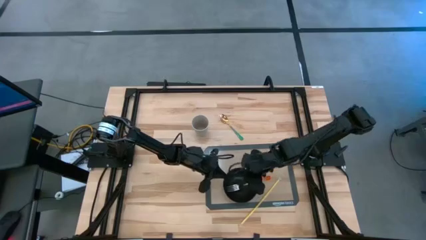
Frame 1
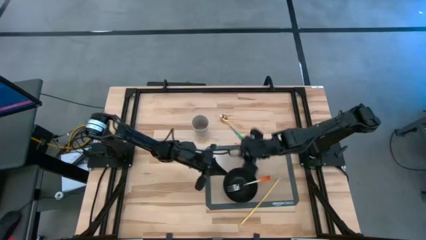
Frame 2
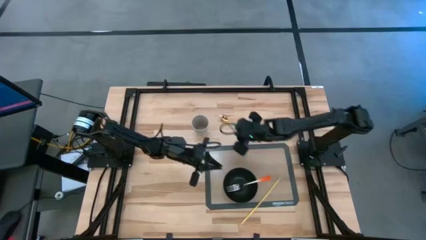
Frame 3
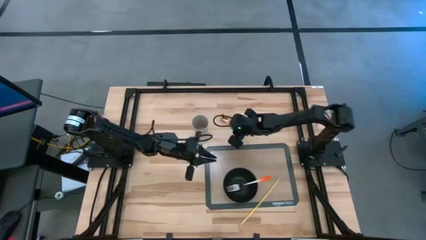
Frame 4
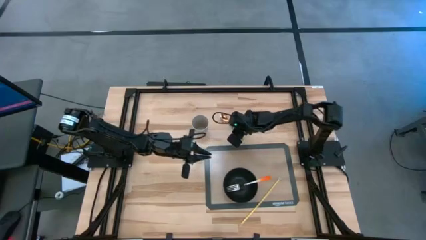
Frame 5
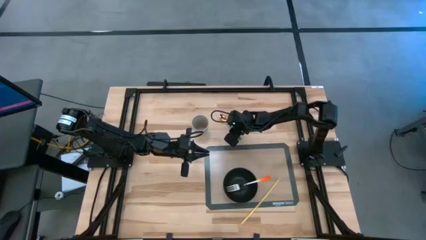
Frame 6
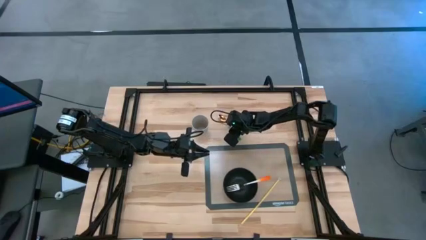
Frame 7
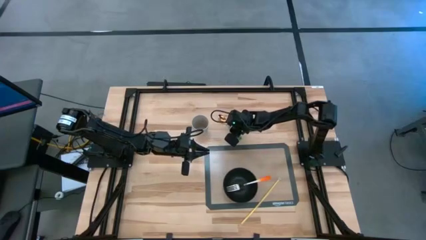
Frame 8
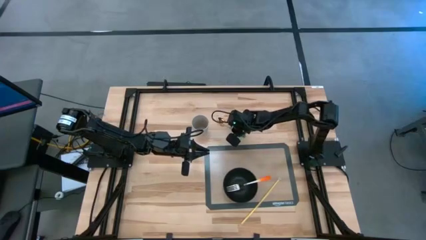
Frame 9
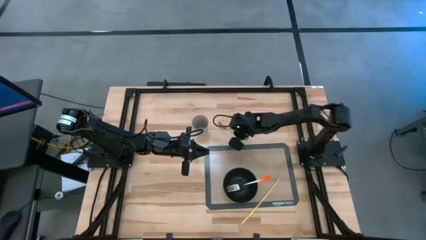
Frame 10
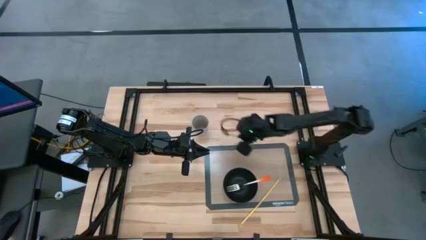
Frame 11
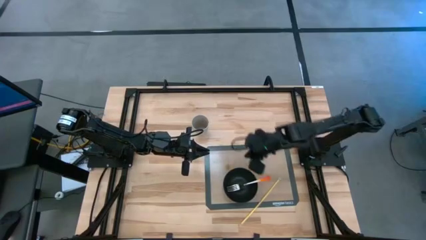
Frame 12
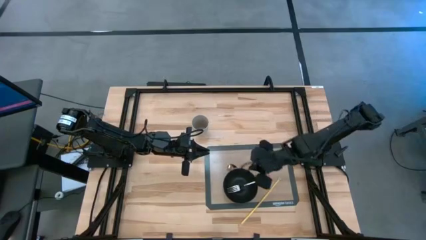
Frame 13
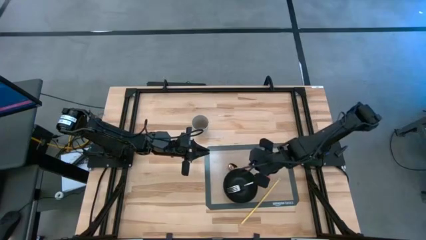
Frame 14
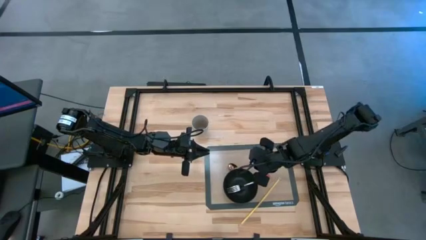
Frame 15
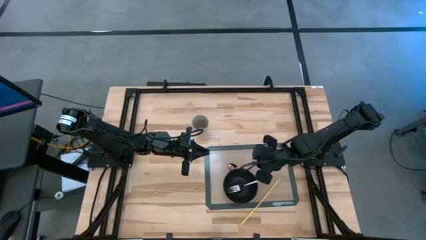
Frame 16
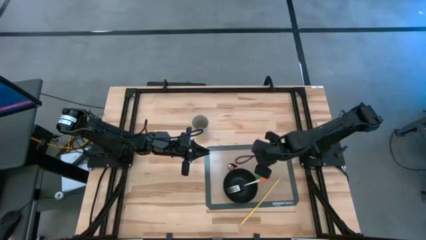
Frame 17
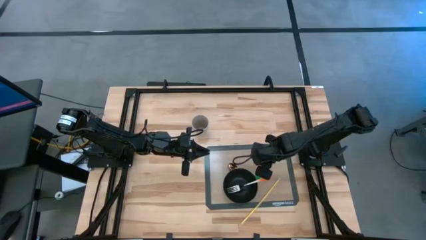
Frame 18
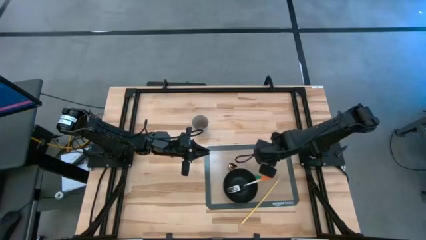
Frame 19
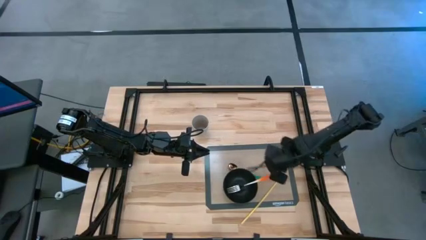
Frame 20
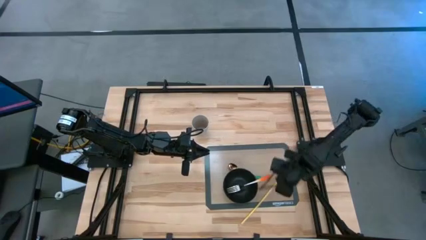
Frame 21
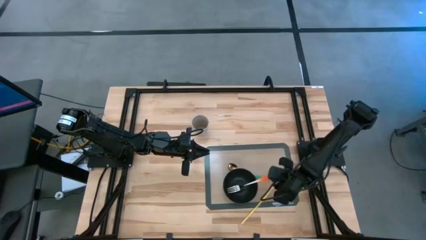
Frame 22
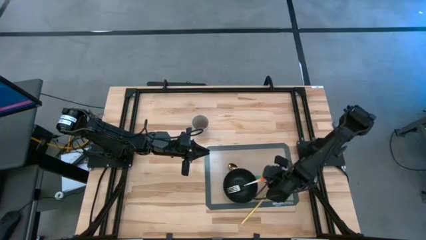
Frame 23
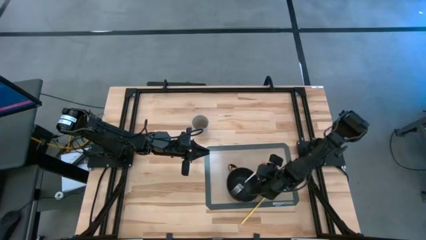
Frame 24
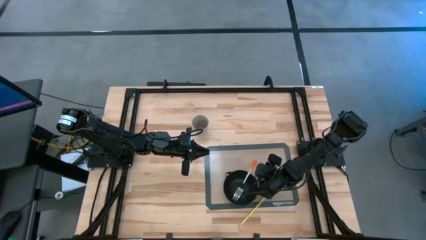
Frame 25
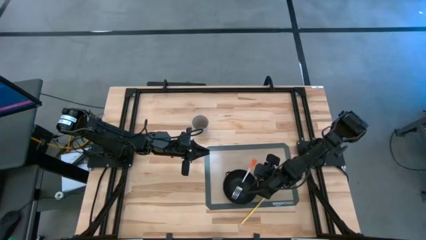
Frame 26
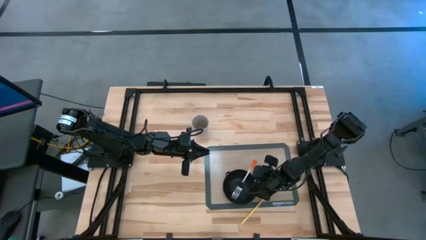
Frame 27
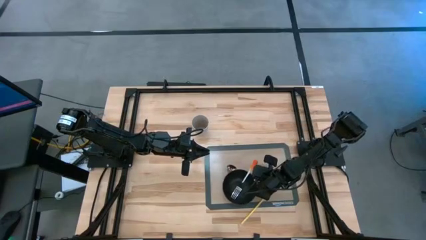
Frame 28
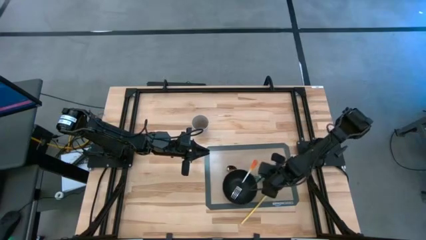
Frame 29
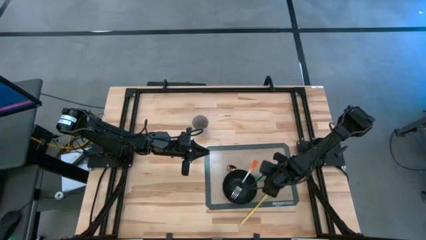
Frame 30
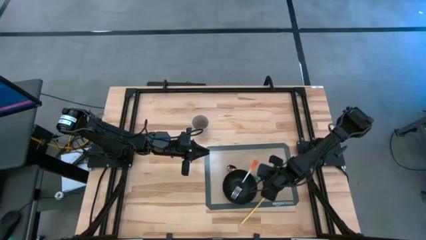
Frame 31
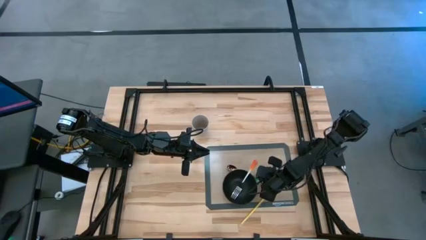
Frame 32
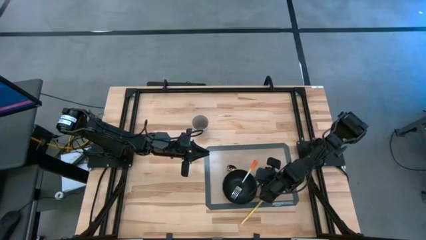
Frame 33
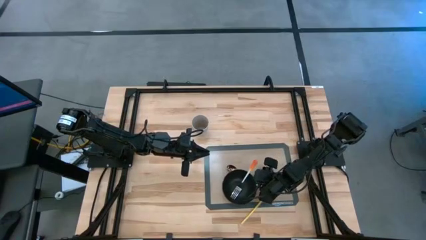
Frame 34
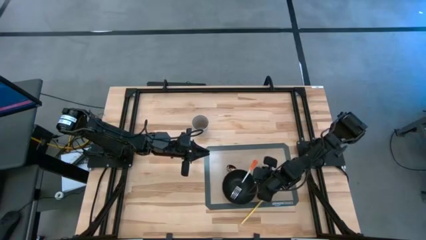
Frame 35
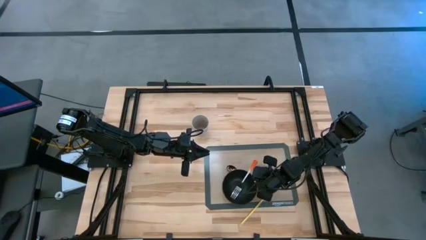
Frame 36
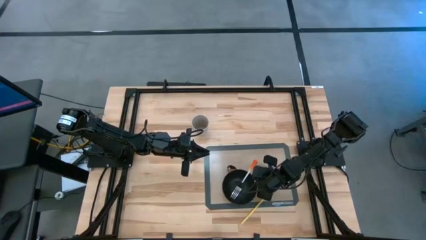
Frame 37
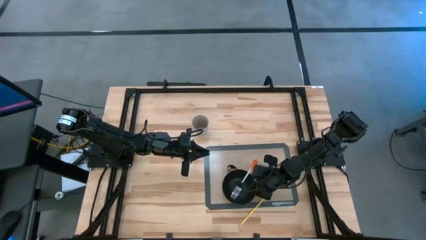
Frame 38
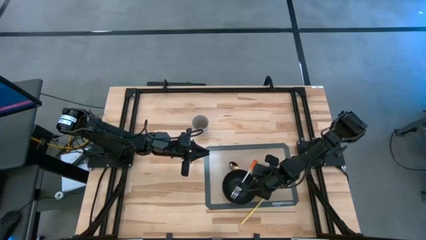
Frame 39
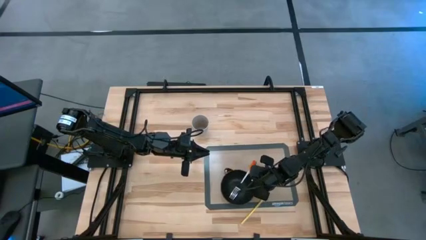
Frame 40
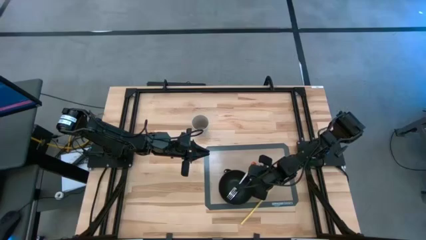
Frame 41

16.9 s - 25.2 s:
Task: Pick & Place Utensil
Put the green spoon into the black bowl

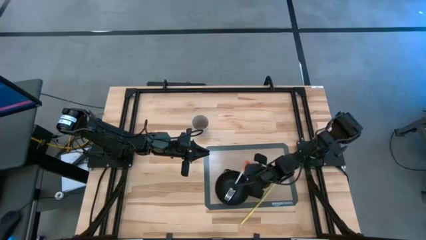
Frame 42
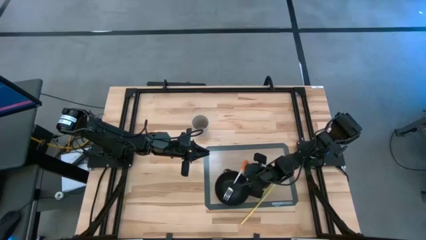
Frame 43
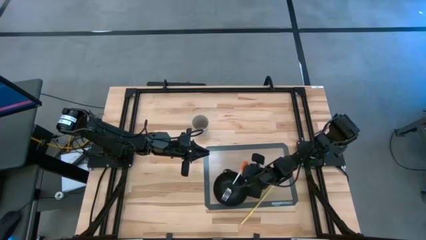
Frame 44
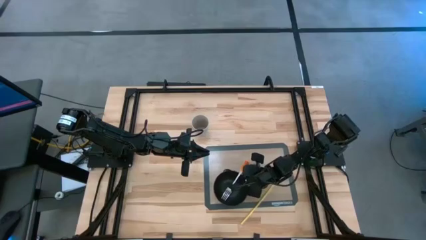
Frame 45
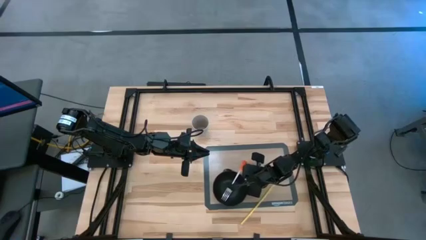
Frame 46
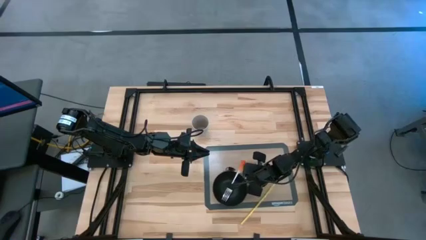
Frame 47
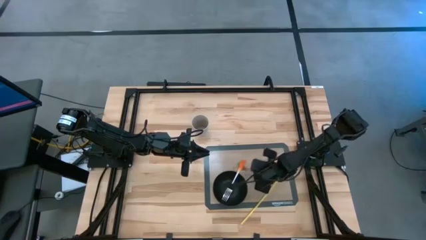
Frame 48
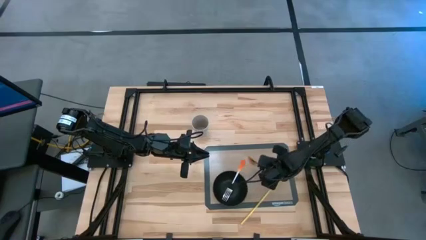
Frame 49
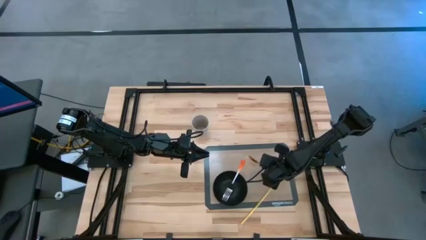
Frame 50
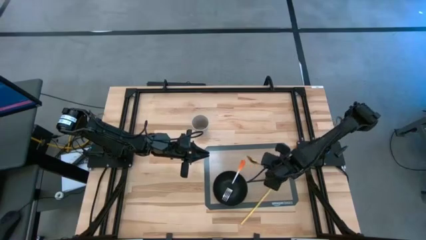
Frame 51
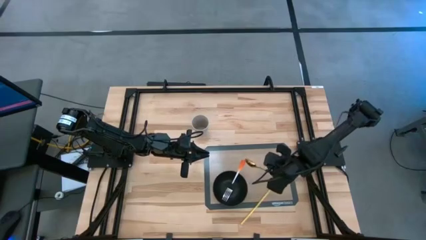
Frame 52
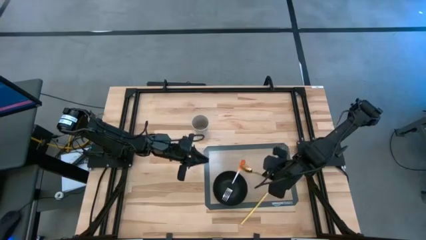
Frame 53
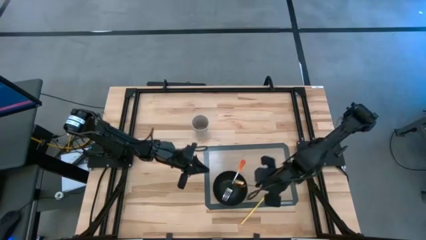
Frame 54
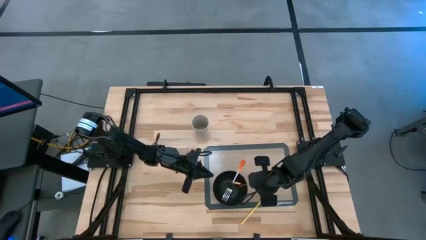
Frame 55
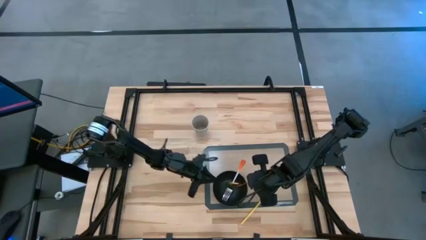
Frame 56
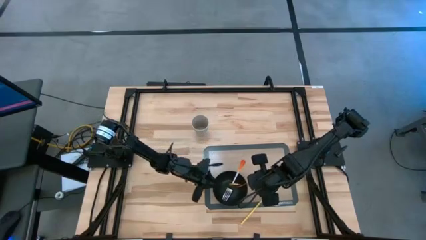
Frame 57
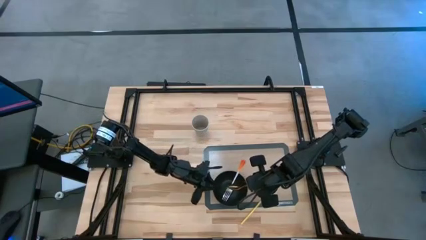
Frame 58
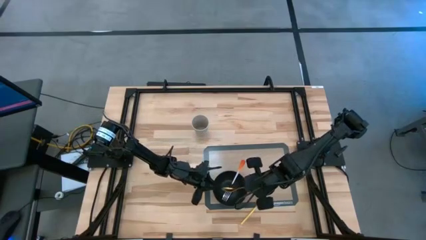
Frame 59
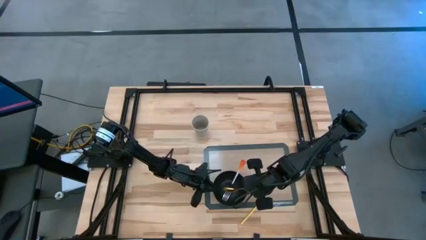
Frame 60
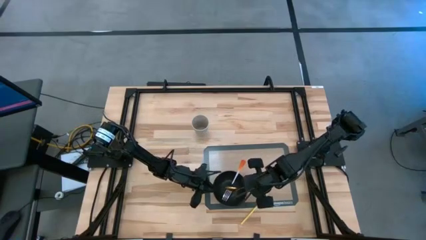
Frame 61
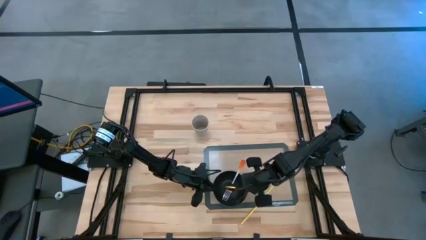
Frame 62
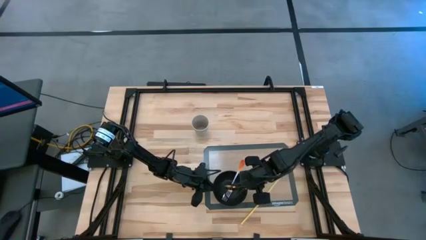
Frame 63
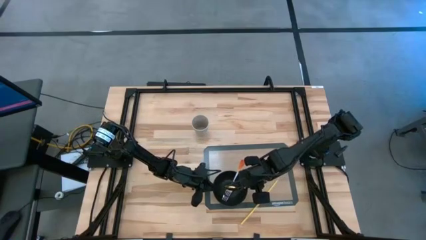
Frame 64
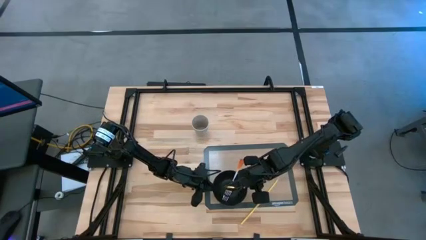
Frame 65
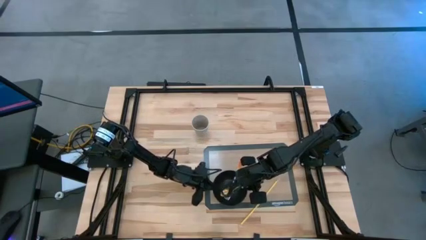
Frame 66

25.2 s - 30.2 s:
Put the green spoon into the black bowl

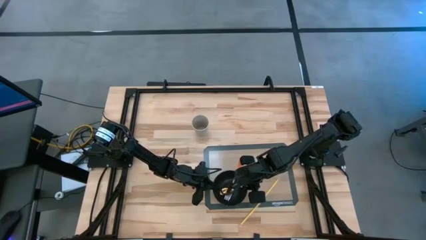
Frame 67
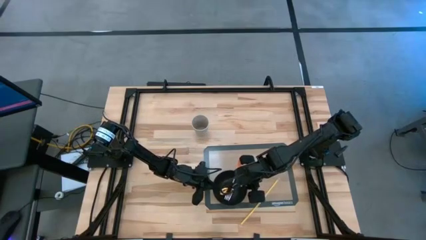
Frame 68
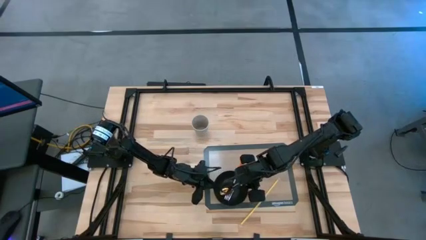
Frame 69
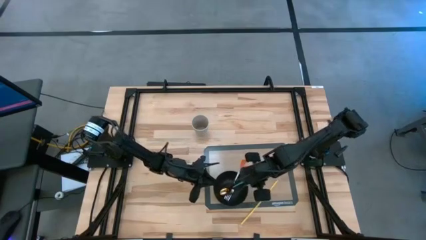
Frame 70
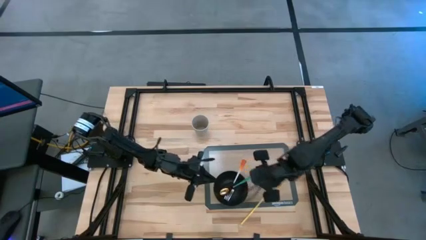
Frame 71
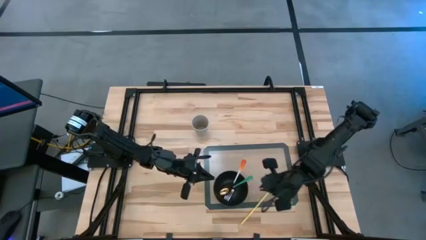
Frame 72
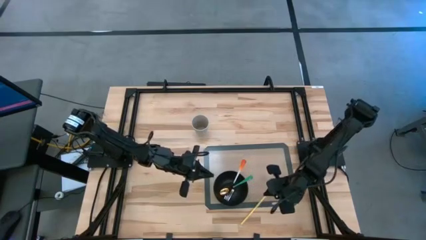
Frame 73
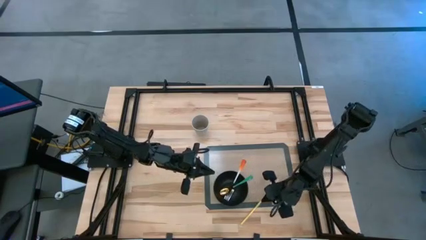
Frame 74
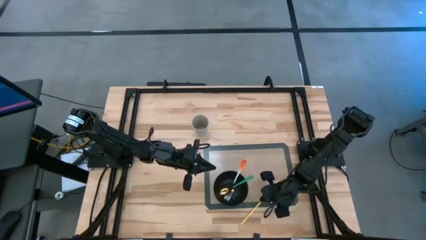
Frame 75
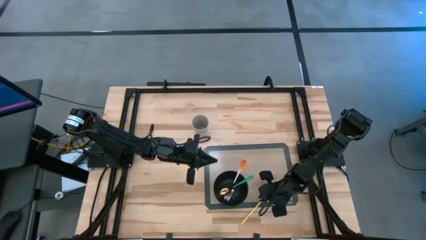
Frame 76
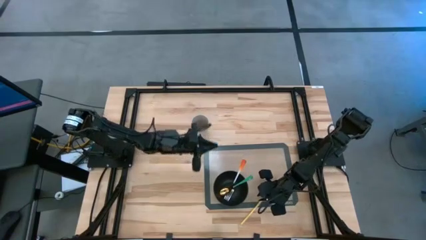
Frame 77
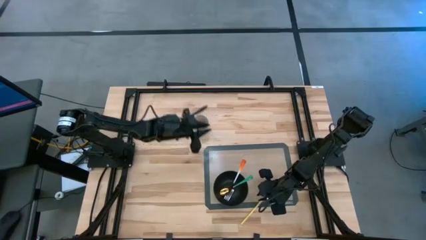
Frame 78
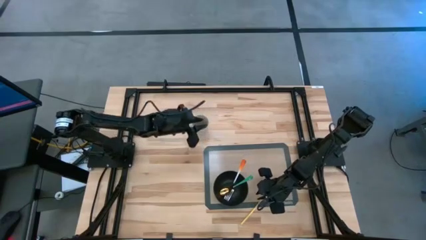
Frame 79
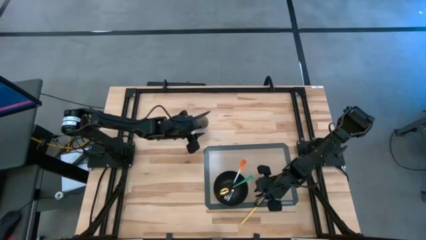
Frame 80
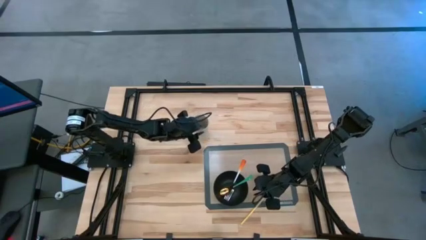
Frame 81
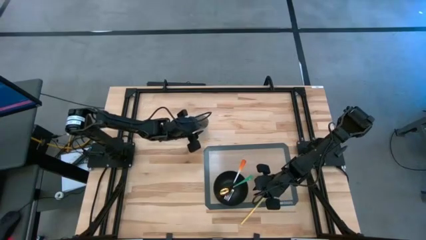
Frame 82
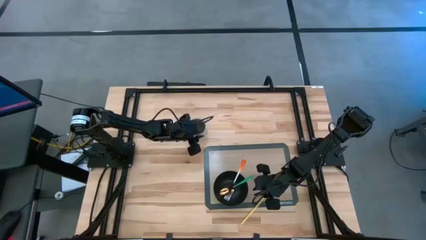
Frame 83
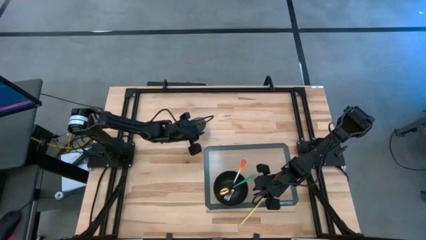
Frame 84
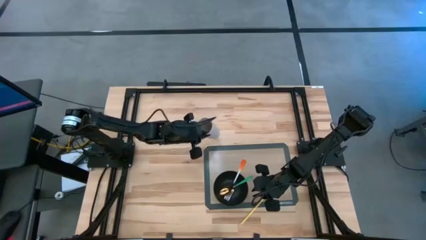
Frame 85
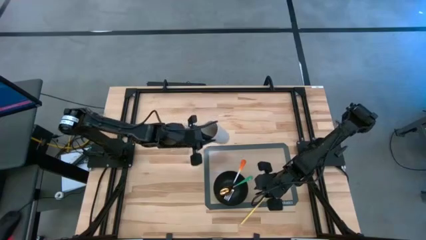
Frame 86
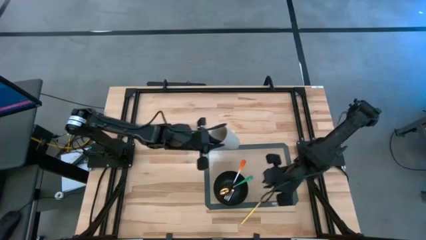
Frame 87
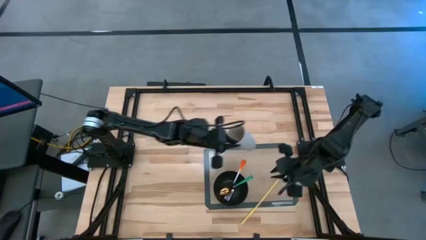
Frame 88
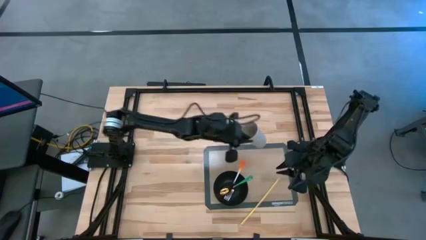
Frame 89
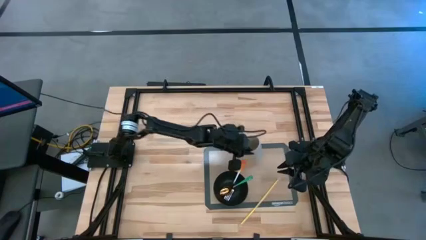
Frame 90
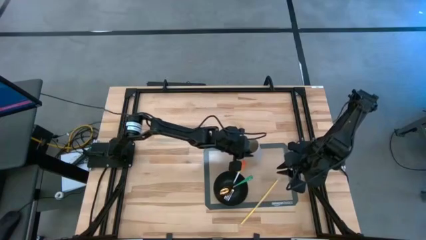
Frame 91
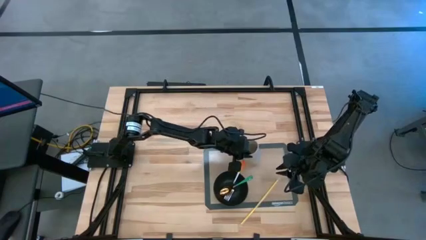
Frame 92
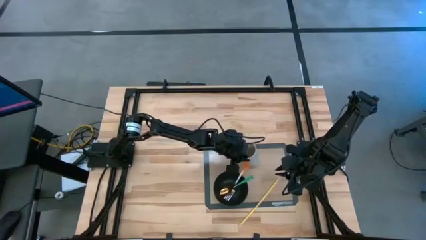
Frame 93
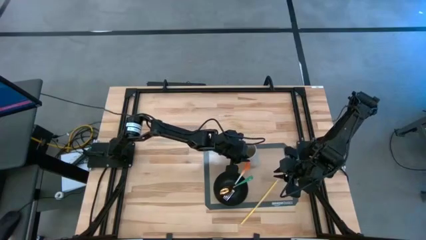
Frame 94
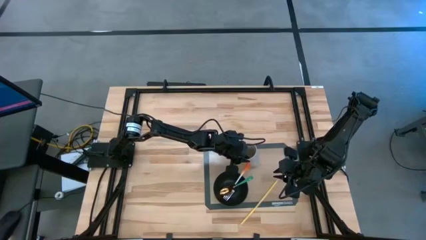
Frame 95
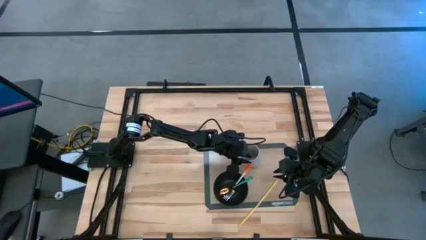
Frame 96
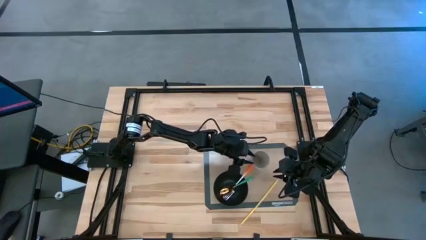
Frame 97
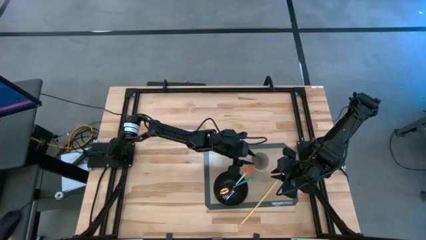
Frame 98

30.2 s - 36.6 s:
Put the gray cup to the top right of the black bowl on the gray mat
